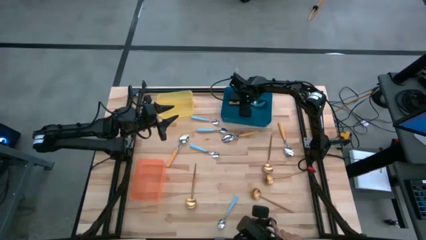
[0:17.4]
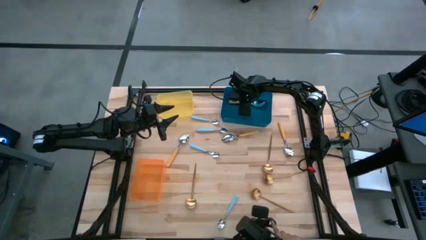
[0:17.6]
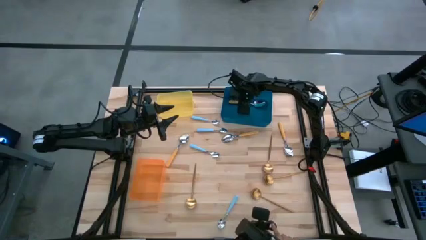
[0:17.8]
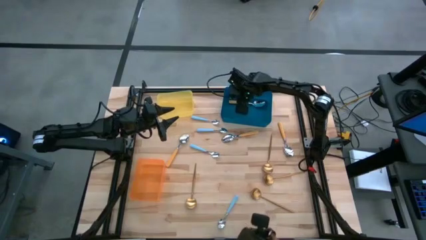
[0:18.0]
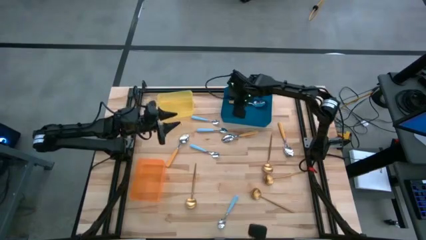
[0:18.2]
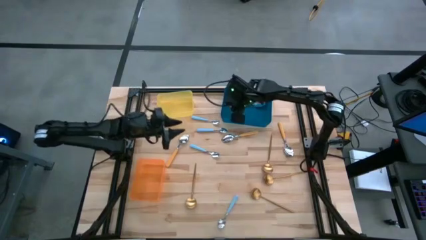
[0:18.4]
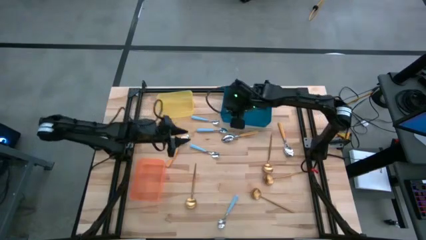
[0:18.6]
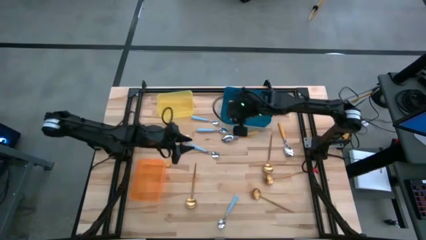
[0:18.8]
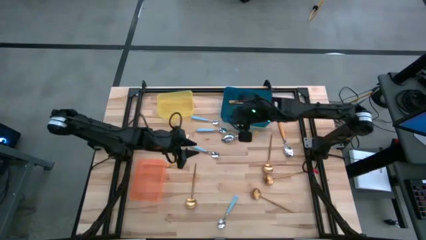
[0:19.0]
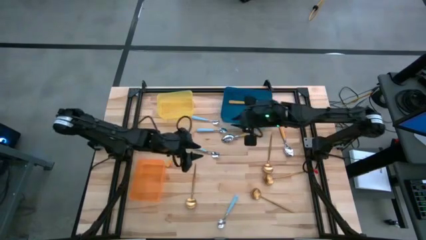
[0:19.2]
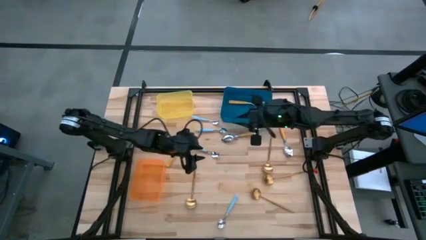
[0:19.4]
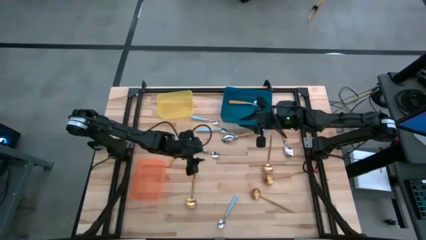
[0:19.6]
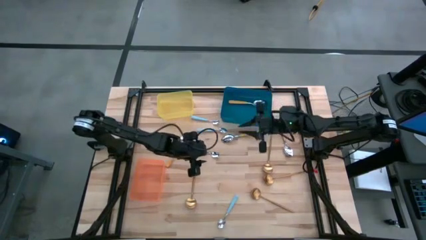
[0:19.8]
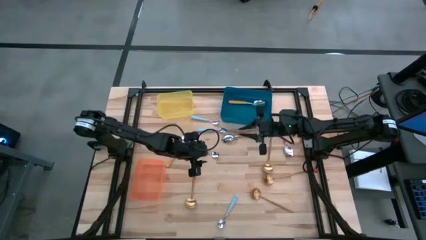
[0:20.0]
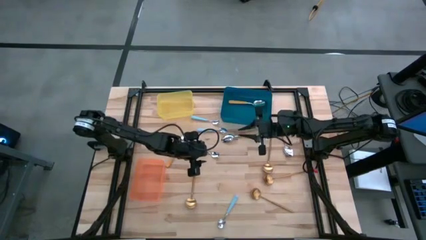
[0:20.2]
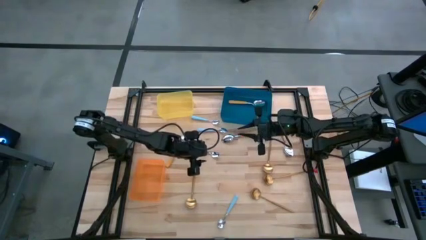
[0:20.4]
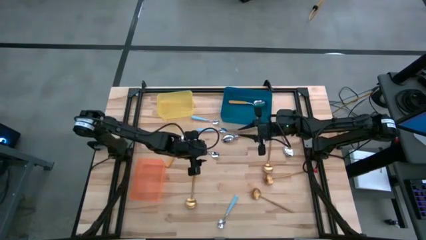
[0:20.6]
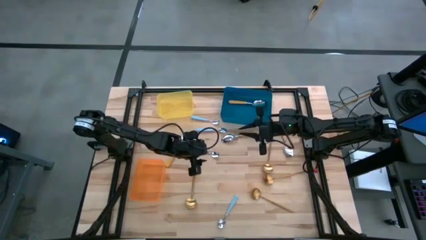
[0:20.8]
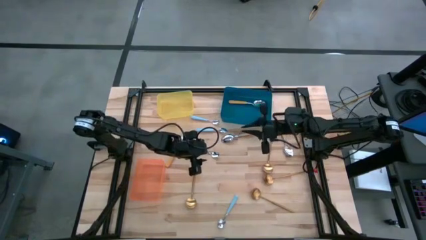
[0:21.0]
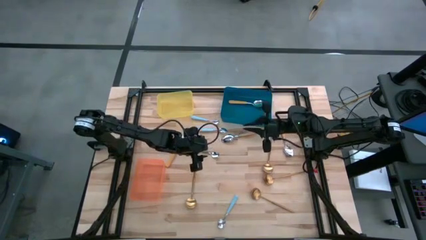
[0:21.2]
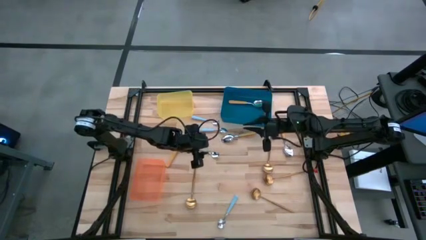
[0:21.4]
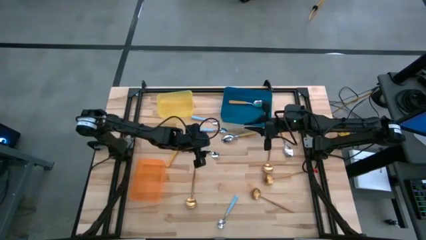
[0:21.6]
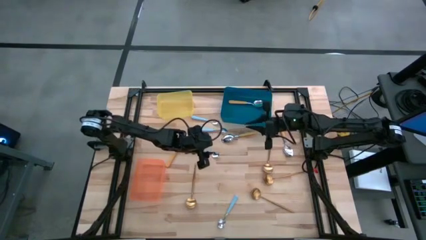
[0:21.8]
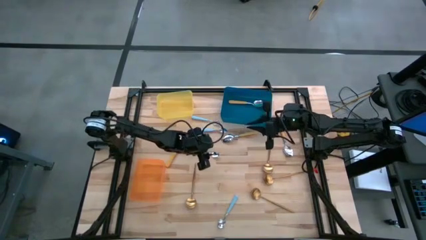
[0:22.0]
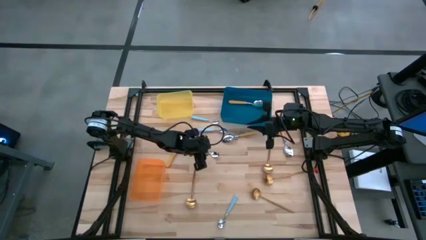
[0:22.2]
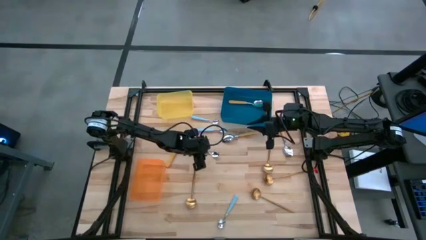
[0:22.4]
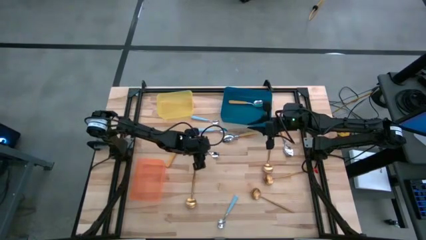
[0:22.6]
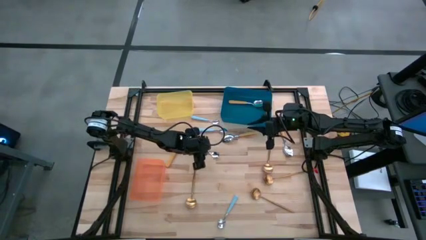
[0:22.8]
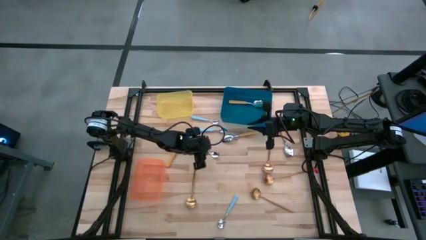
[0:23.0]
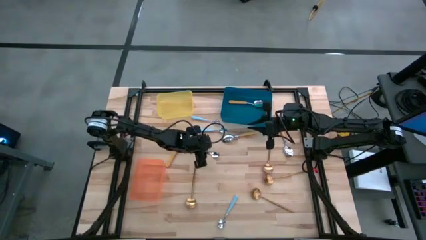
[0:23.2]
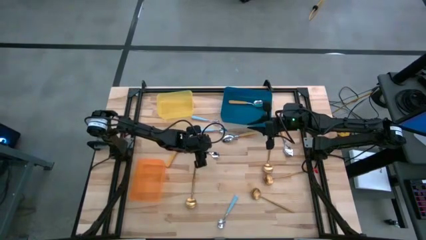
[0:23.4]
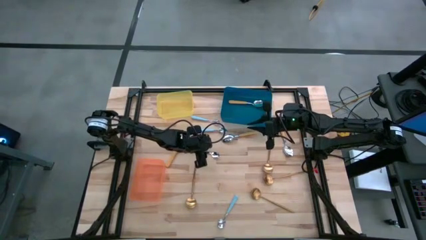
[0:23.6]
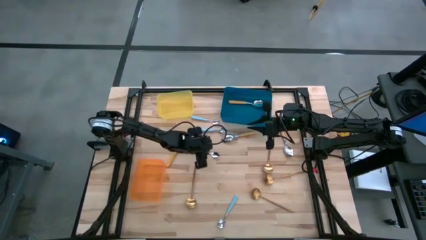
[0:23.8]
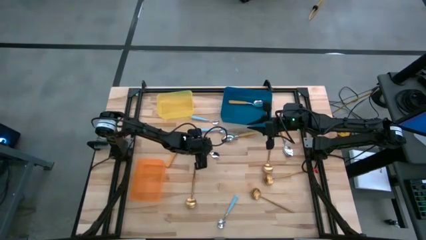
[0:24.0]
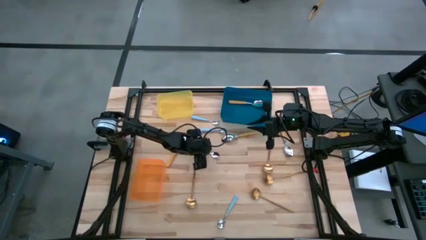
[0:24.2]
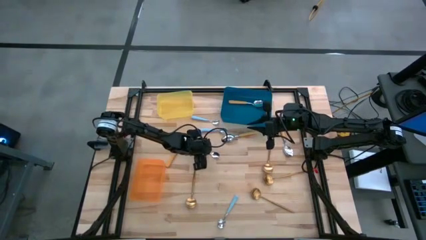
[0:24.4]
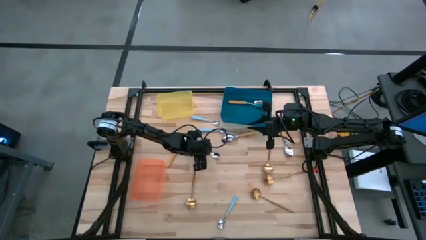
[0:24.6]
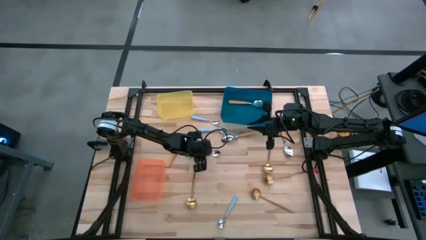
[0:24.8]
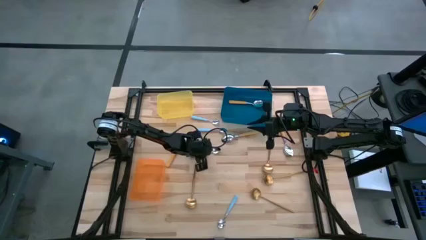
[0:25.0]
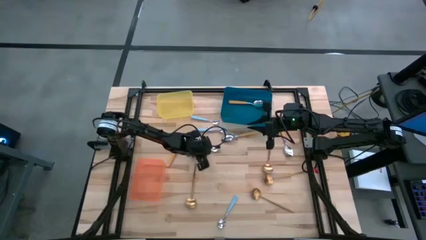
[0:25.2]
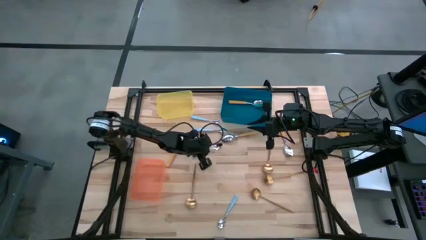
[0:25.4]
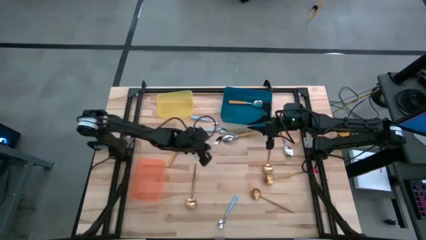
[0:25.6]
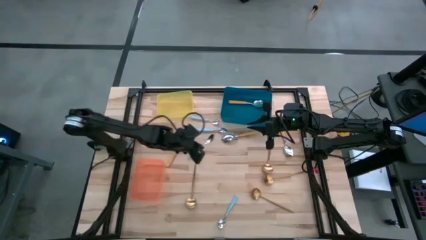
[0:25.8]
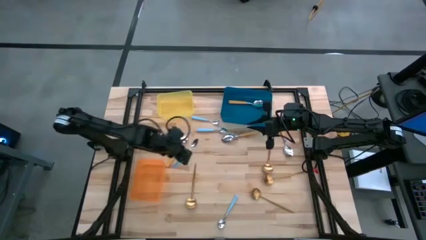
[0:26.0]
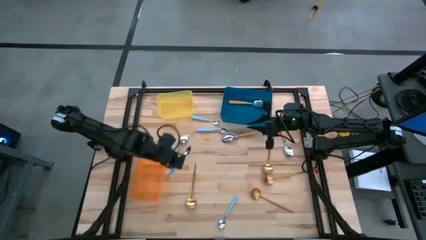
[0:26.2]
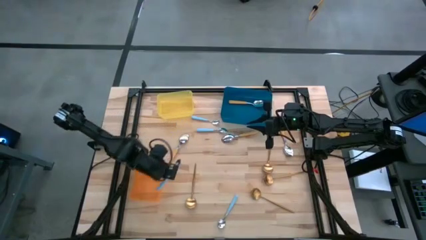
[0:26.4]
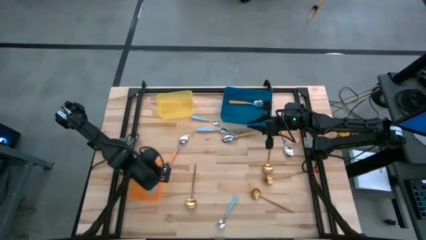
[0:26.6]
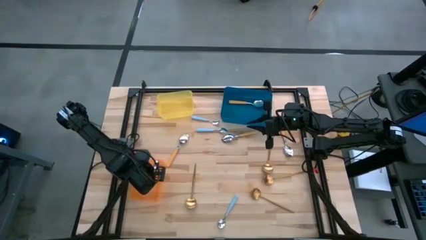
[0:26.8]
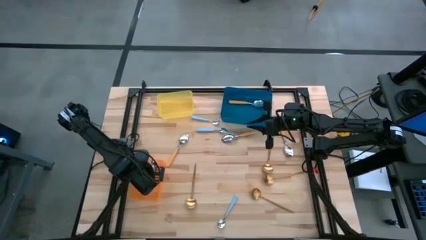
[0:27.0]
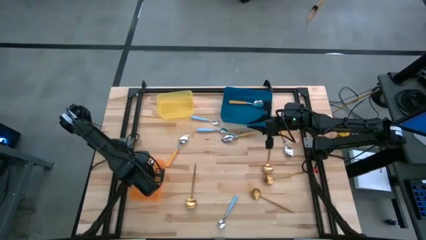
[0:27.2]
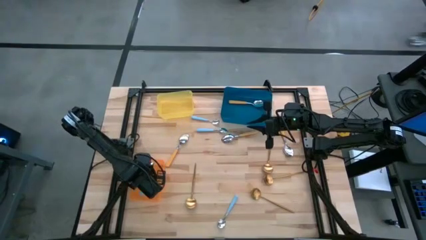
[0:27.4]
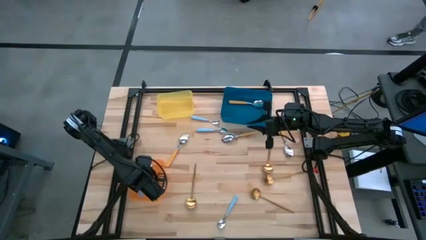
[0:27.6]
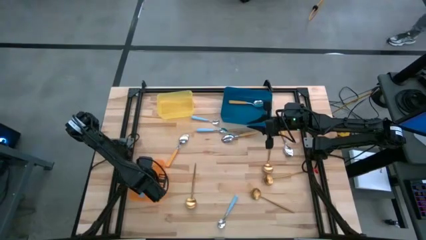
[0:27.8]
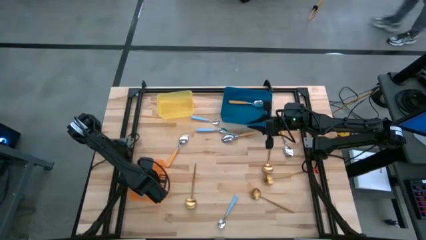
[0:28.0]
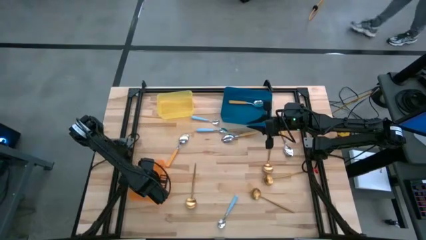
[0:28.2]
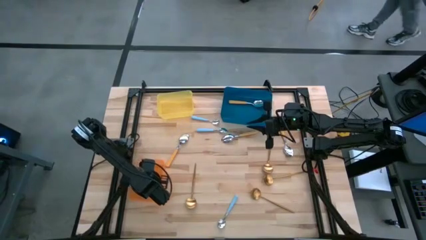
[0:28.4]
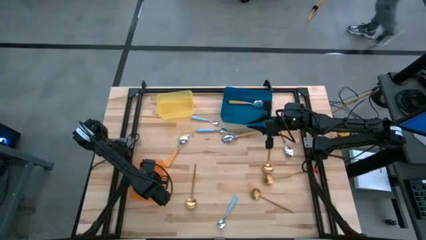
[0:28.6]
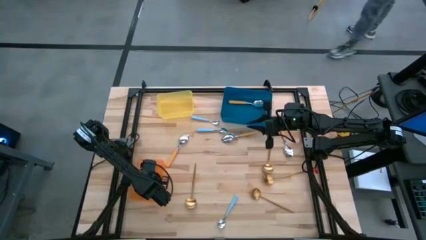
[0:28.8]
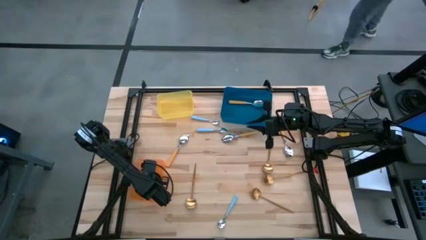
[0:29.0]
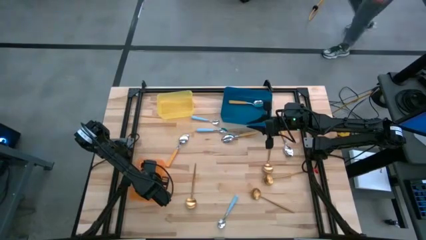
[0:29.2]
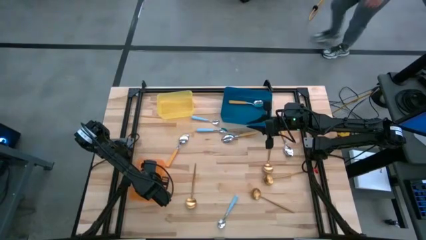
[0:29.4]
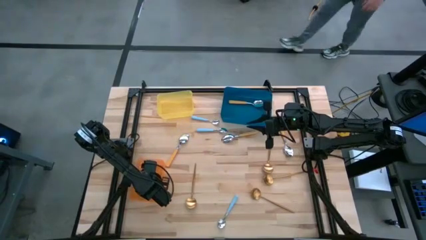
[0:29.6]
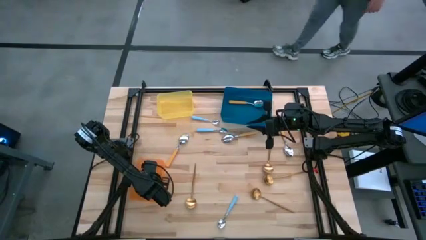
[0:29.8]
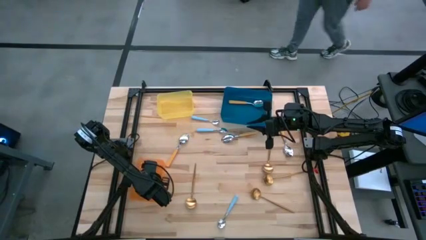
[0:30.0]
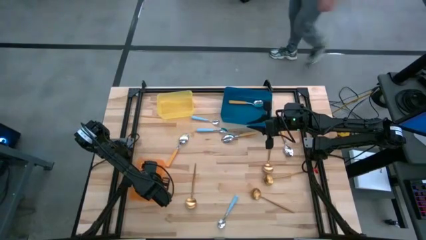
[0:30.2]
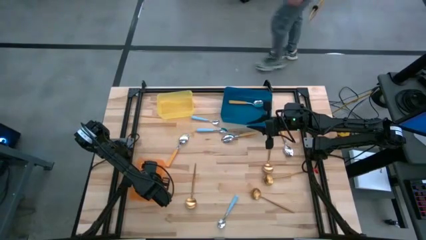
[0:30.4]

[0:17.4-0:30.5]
Task: Sort silverware by color (type)
Put the blue spoon into the orange bin

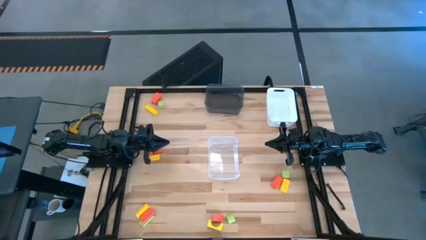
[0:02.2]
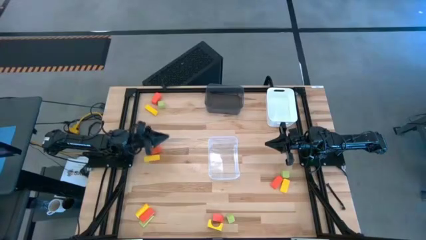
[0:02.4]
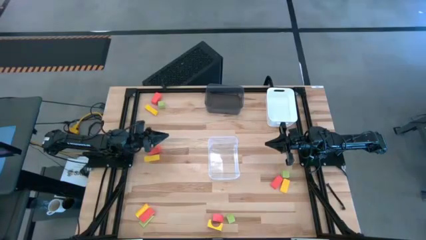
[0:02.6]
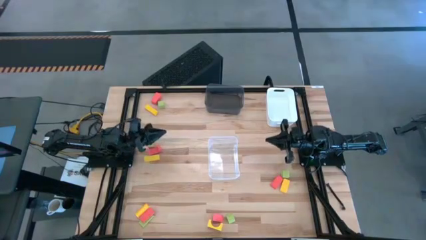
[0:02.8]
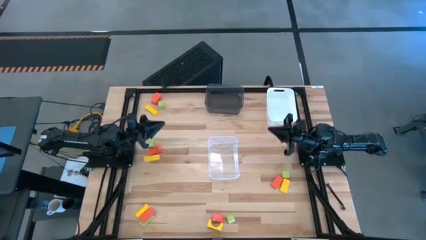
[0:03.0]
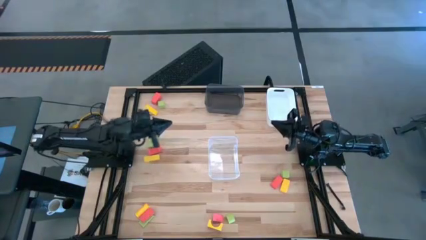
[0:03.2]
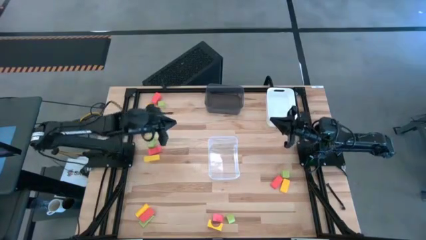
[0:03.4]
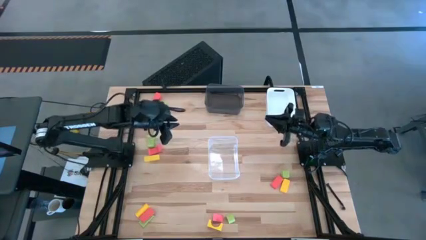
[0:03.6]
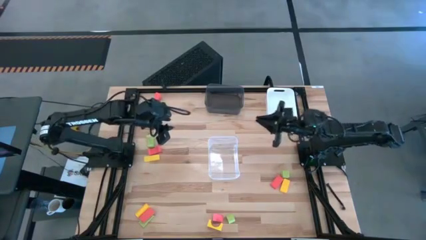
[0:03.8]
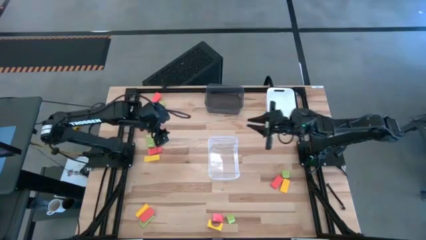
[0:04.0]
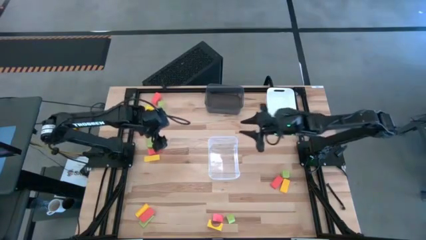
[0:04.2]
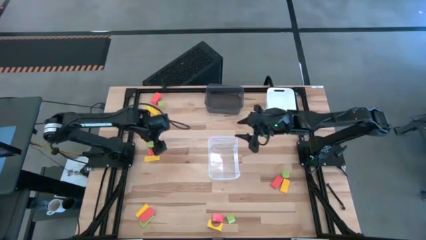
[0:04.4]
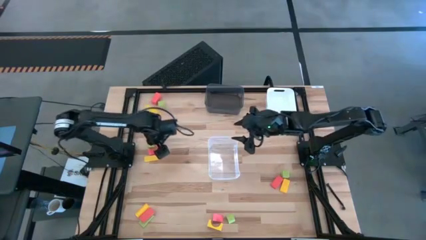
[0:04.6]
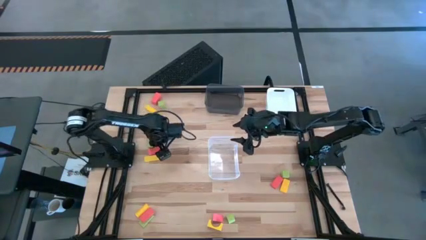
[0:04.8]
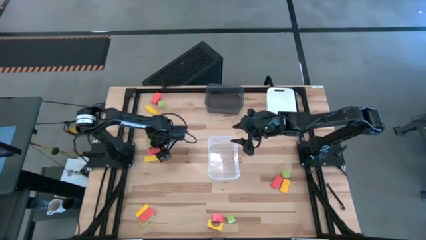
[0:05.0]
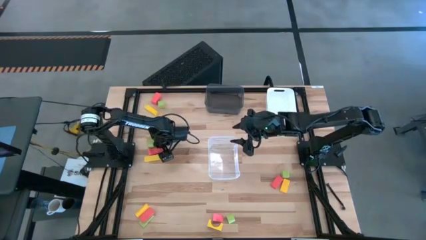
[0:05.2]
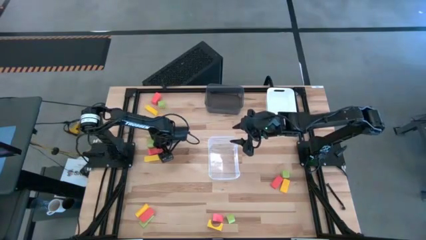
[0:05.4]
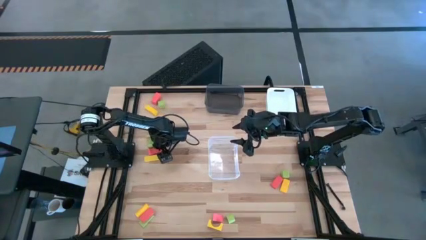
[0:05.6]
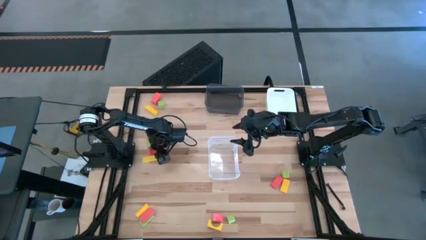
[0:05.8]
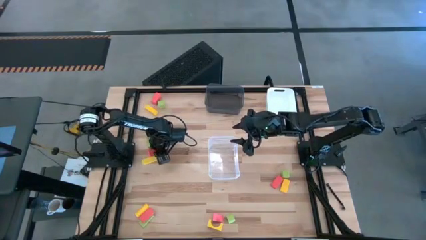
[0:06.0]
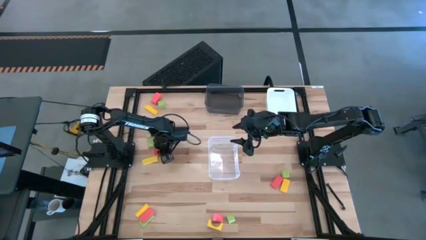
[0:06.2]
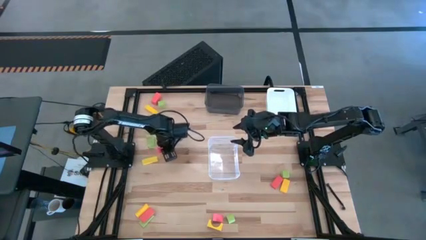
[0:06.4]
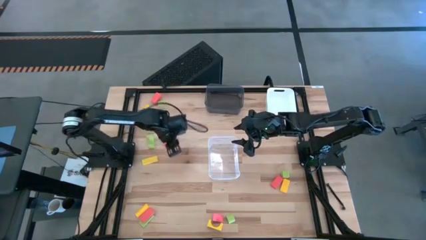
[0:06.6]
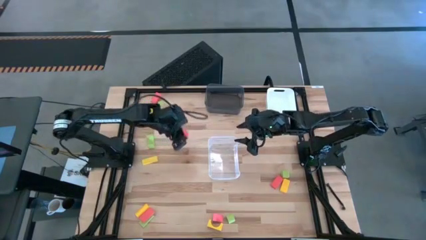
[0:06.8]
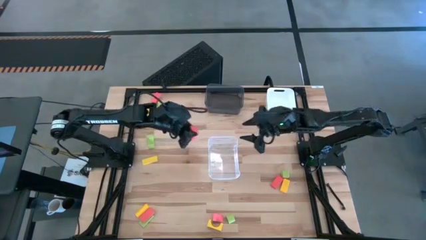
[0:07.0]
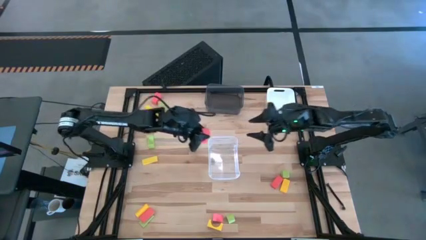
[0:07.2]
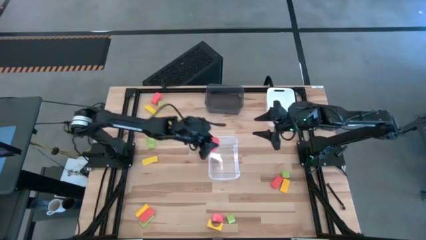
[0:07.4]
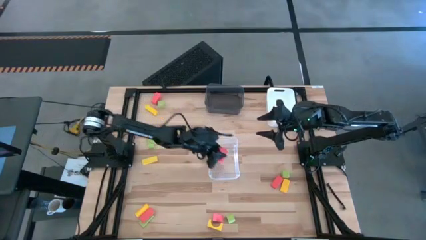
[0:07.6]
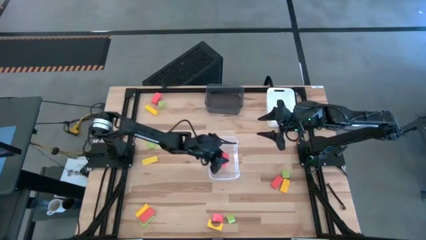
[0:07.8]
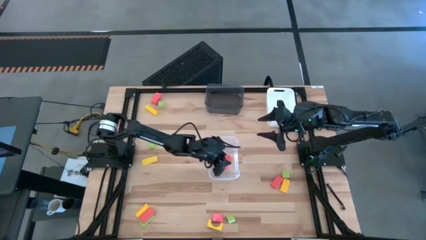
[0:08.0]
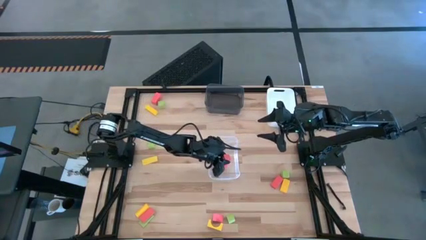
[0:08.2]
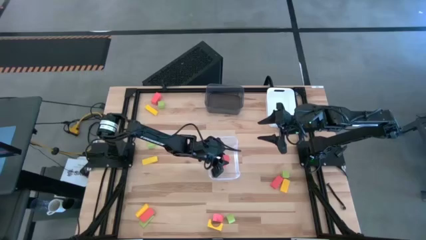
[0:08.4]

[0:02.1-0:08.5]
Task: Sort & place blocks by color
Put the pink block into the transparent bin
